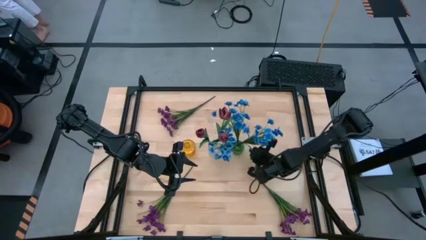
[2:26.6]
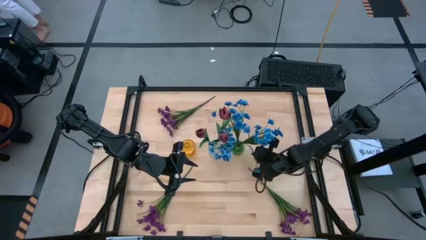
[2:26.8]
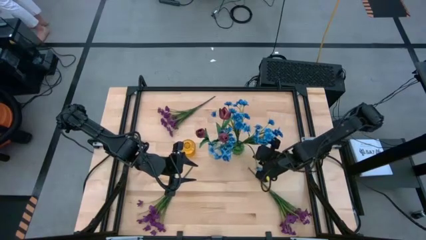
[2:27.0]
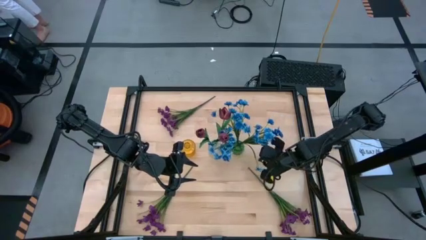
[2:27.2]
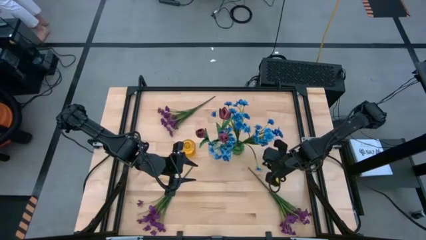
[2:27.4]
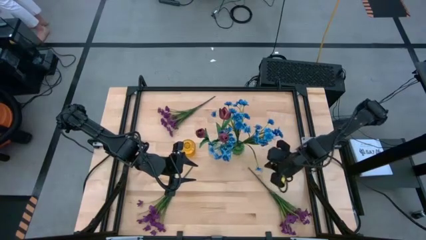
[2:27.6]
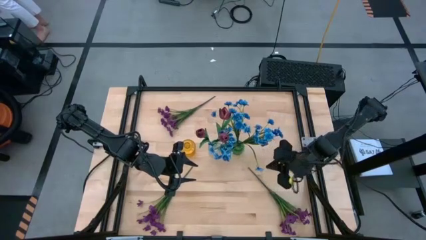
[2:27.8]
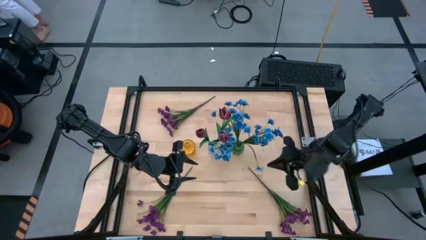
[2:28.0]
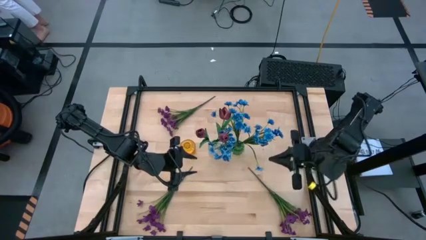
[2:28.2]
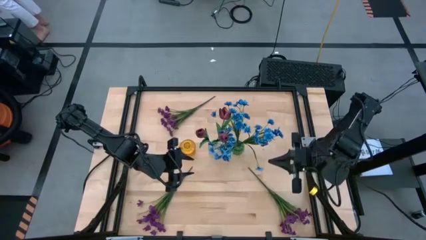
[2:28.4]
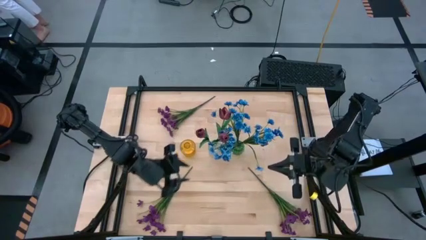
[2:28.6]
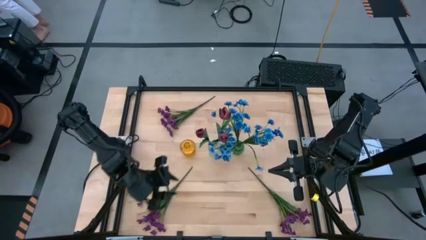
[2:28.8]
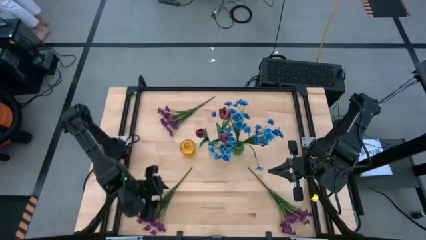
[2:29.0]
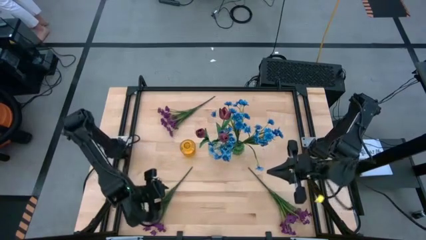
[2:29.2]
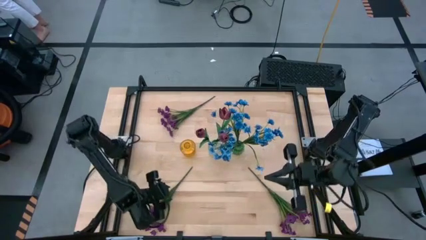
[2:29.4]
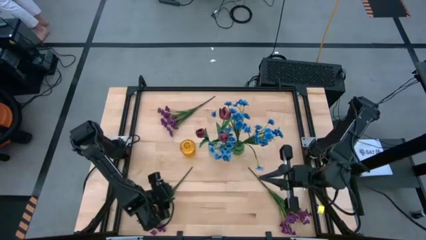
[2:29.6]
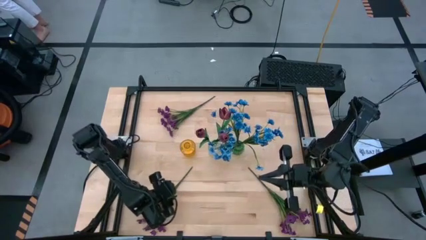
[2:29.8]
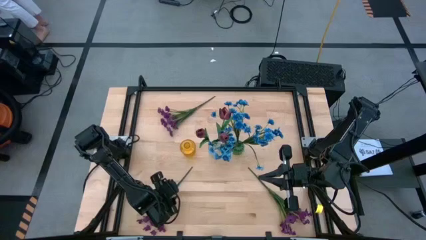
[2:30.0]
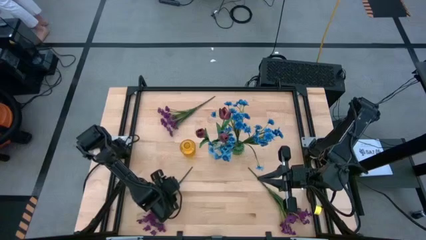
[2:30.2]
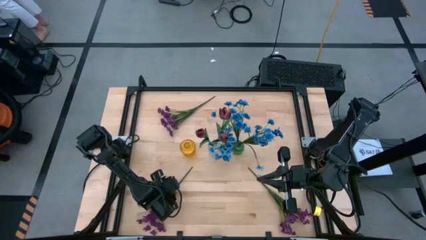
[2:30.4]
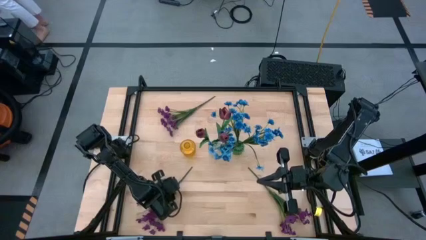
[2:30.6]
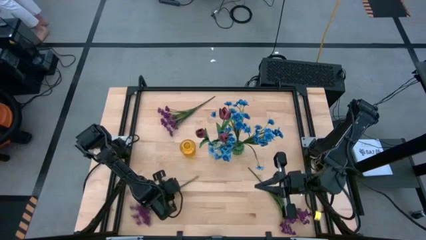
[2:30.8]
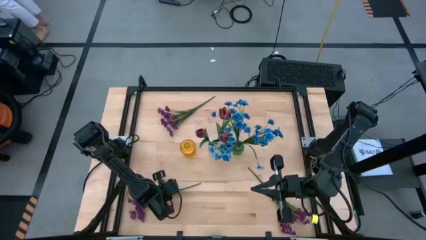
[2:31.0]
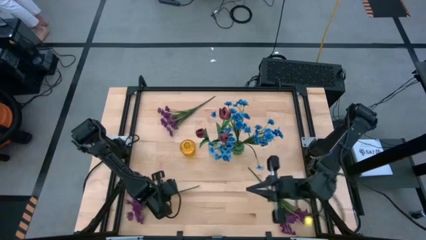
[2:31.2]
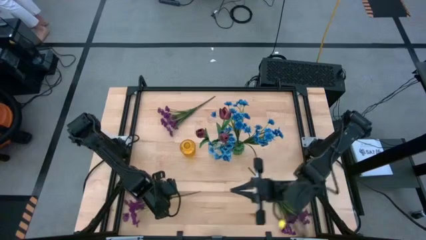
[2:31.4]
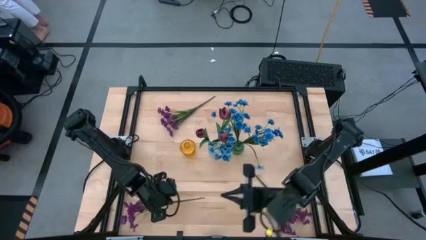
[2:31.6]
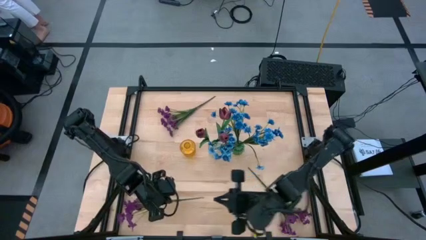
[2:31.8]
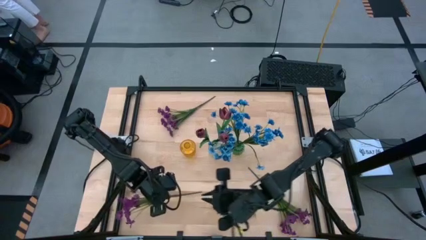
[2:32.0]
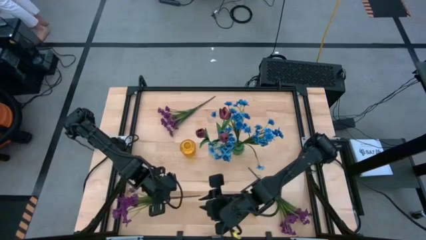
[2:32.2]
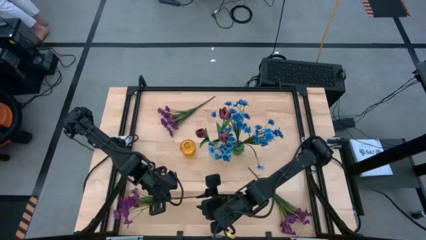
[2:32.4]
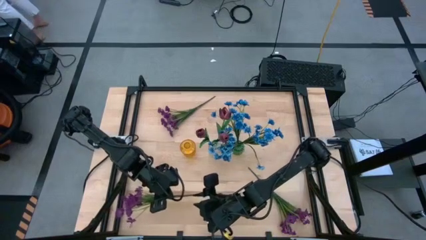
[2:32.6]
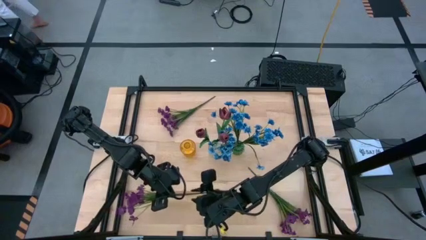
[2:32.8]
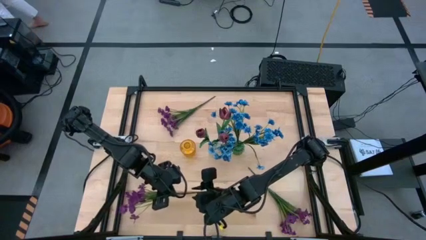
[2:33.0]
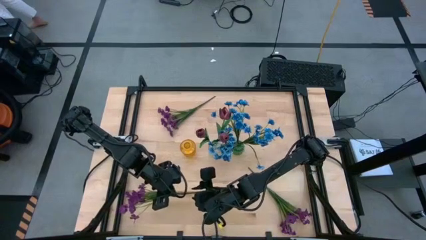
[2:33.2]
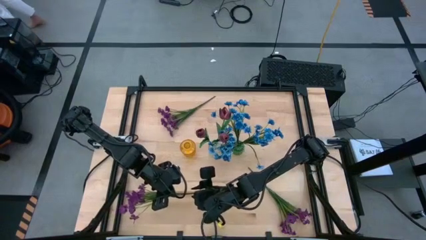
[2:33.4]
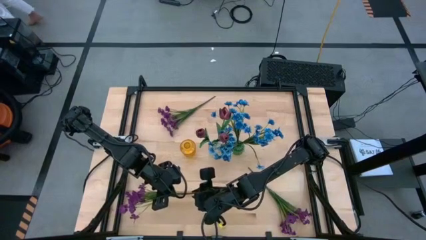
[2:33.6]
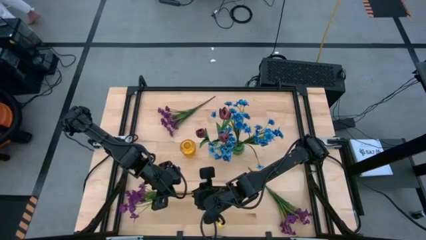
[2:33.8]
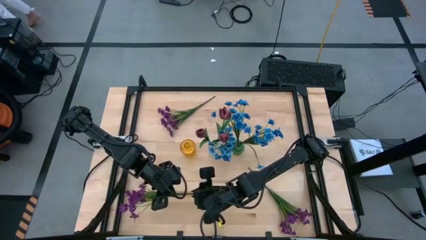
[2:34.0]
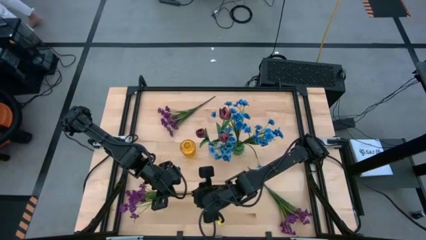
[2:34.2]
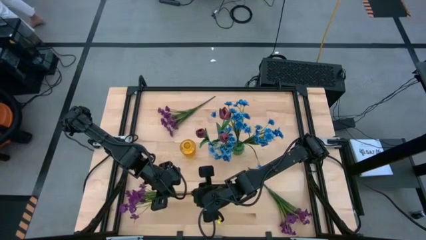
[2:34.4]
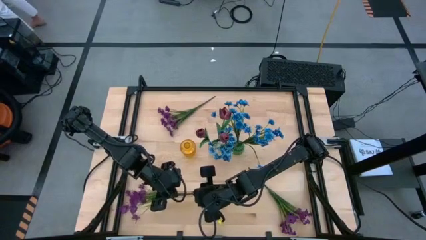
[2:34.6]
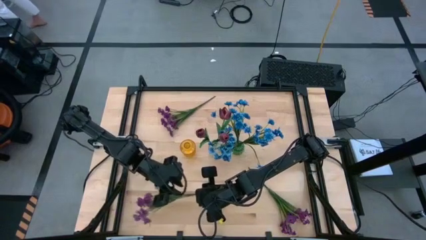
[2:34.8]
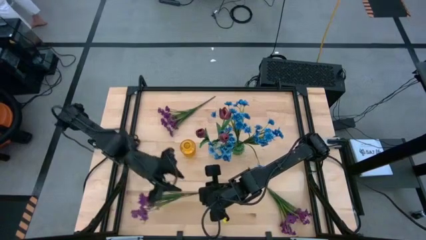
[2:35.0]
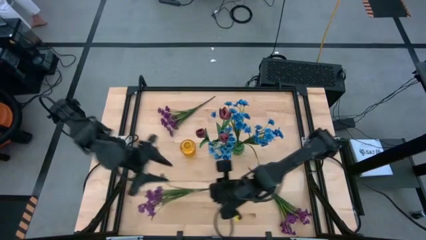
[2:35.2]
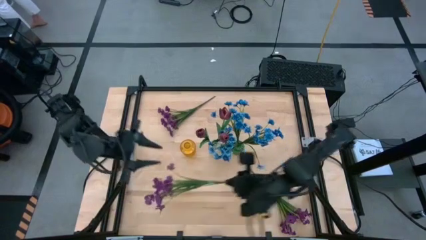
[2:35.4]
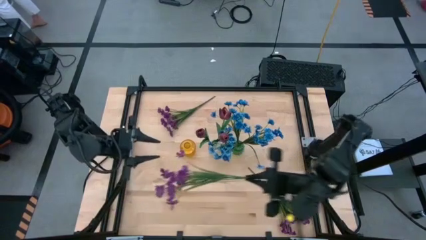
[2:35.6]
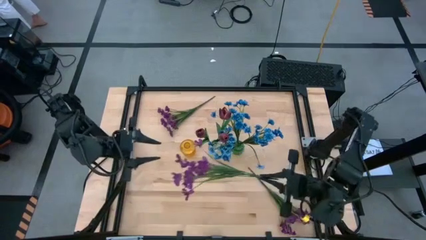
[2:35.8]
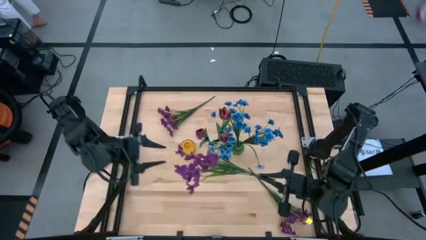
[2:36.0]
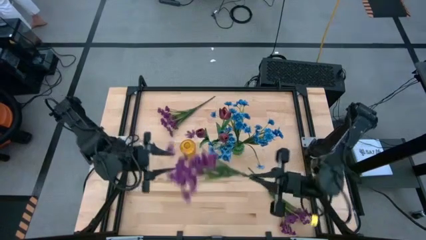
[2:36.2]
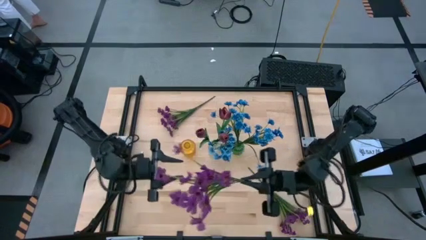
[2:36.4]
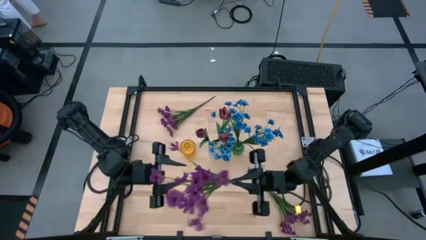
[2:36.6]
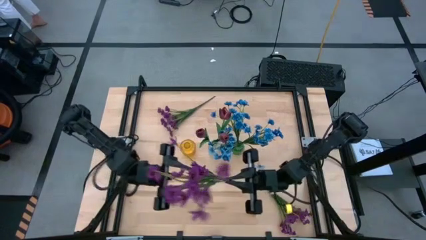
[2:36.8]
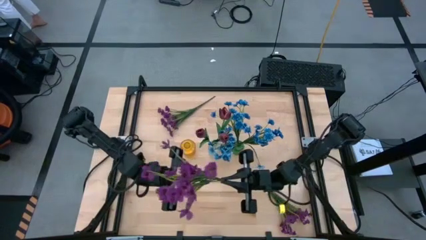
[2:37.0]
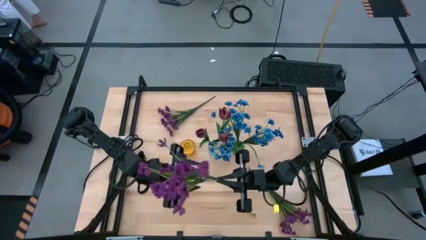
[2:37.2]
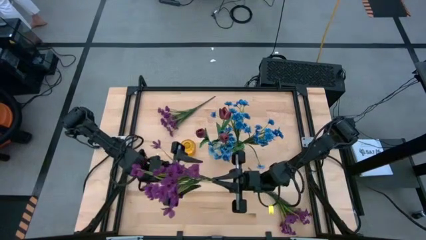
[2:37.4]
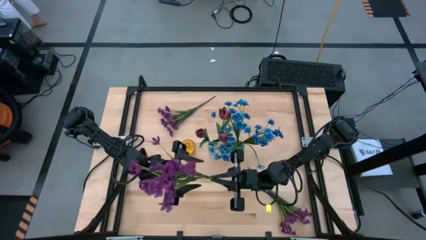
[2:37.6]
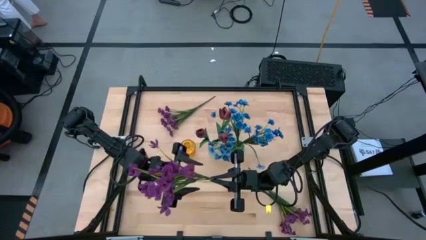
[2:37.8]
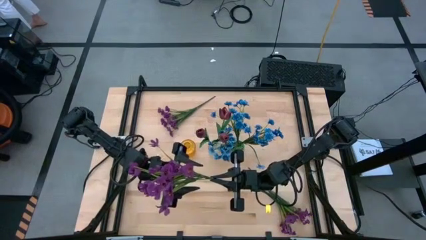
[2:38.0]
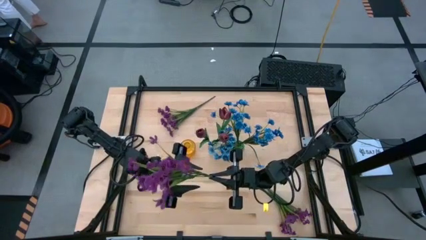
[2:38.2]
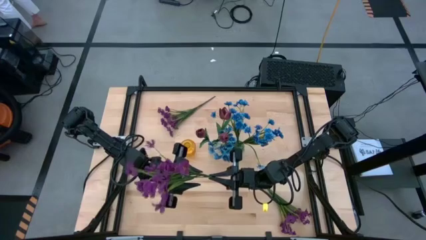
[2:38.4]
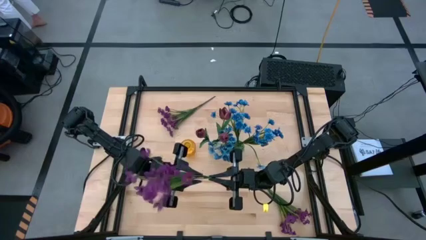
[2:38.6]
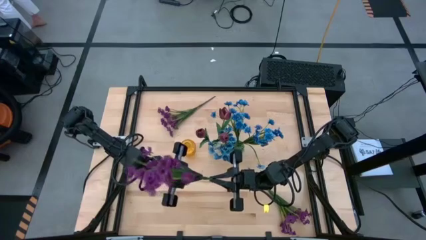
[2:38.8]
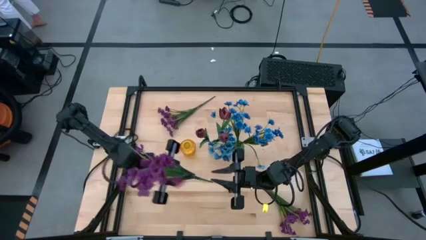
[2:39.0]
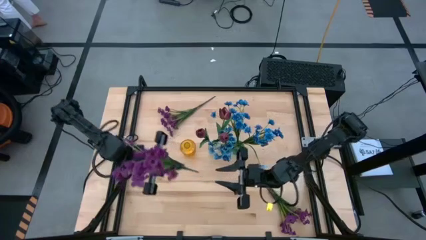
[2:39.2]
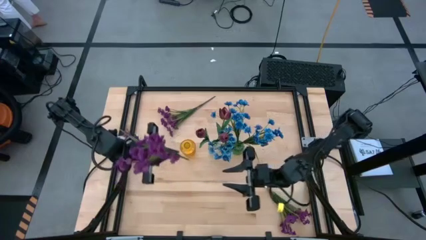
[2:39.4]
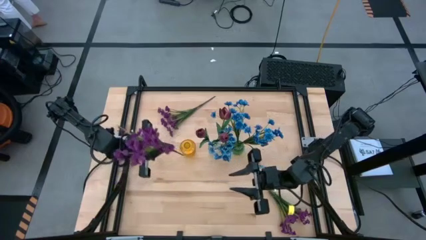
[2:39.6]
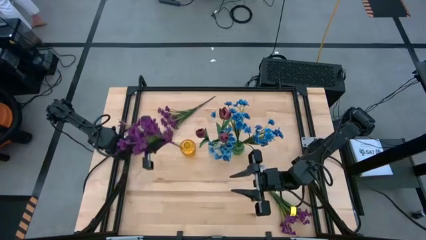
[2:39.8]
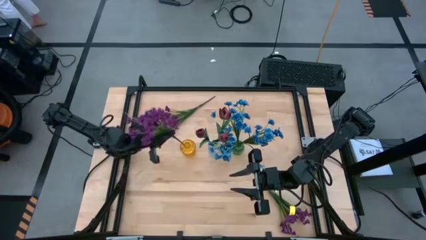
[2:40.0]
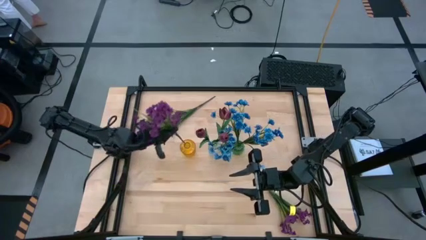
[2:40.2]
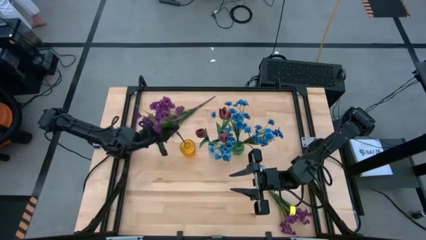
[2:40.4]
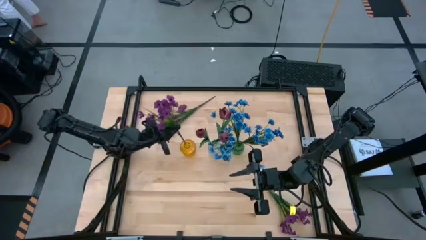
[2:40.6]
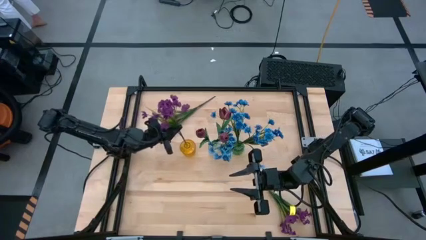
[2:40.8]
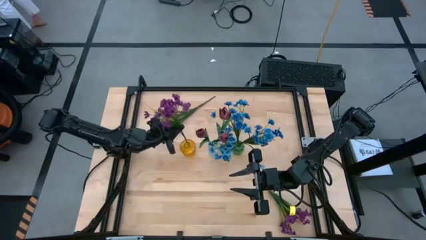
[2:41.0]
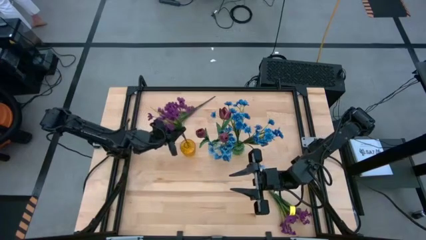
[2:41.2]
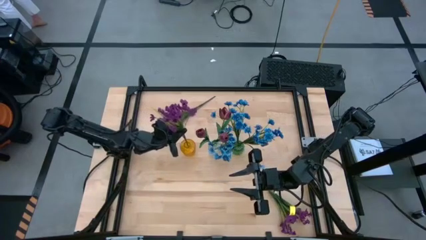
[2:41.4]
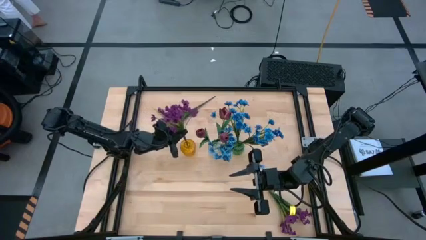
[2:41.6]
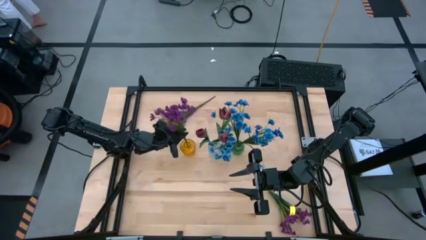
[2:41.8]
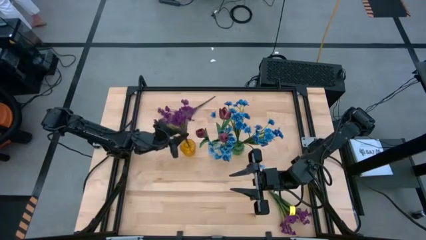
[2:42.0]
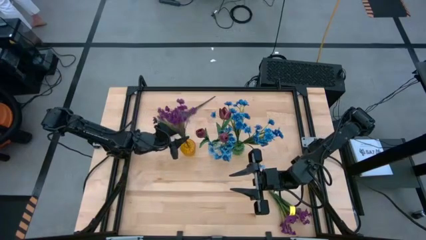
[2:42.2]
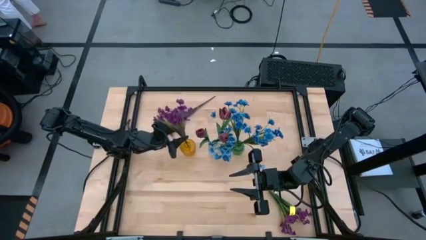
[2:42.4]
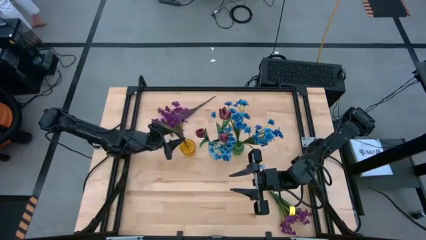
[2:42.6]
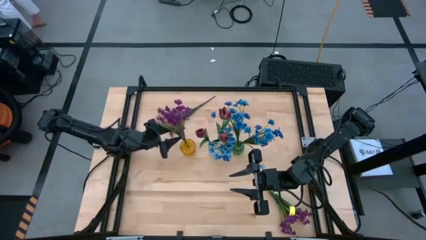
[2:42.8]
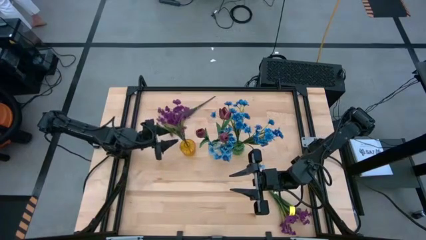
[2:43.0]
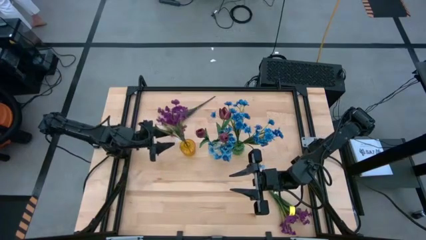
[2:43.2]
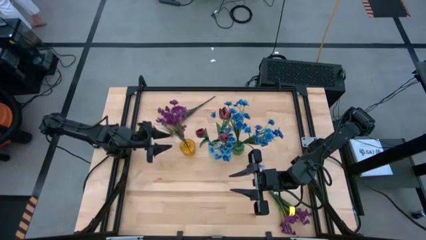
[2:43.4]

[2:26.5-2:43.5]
Task: Sort flowers into vase by color
Put the bottom left purple flowers into the yellow vase
